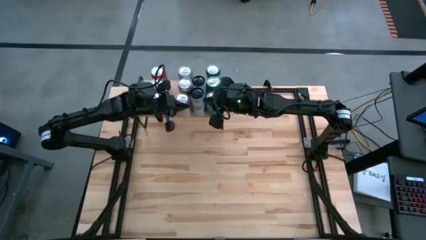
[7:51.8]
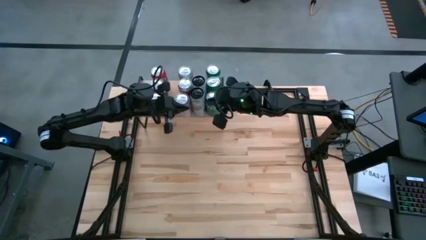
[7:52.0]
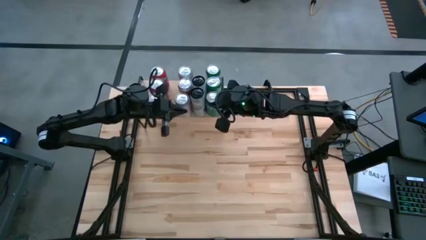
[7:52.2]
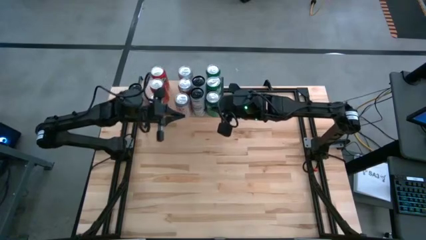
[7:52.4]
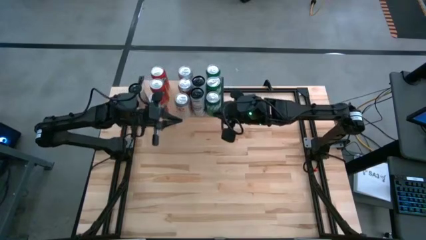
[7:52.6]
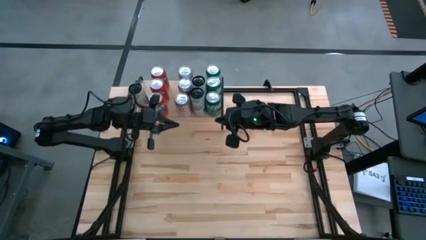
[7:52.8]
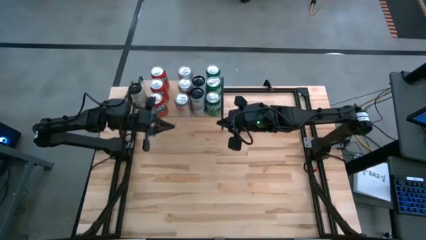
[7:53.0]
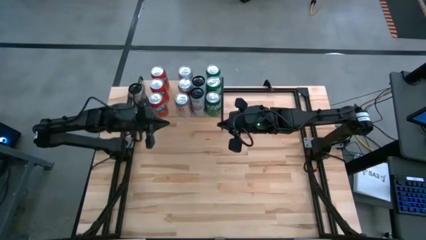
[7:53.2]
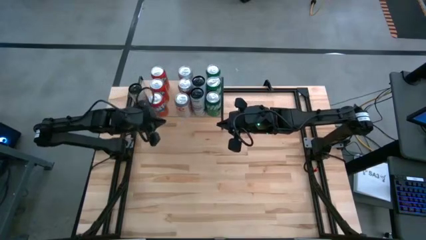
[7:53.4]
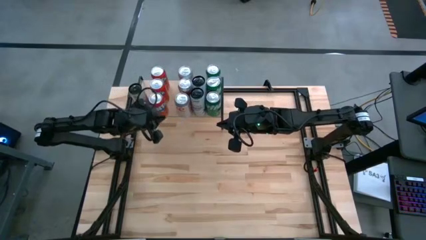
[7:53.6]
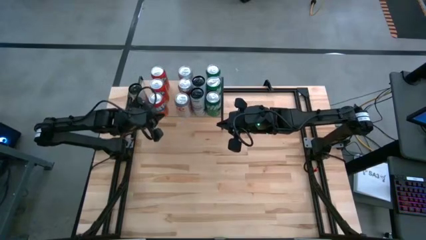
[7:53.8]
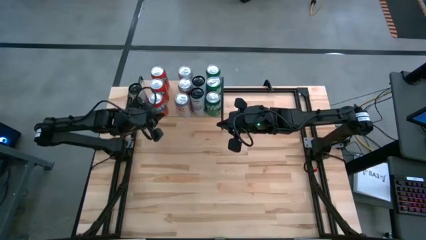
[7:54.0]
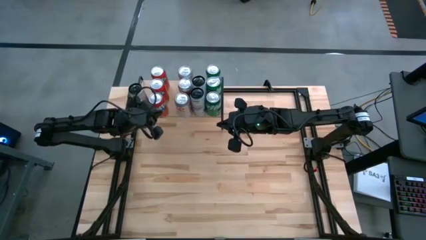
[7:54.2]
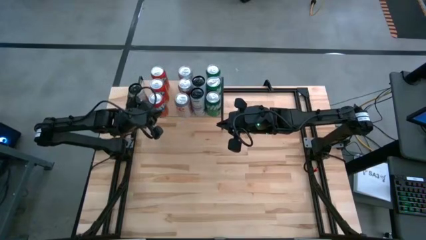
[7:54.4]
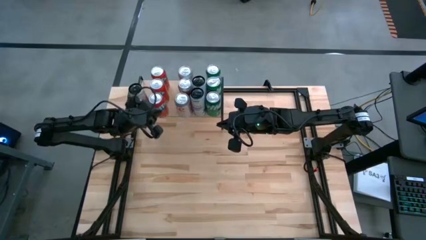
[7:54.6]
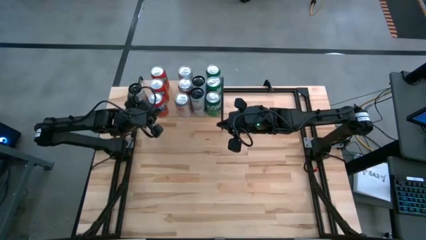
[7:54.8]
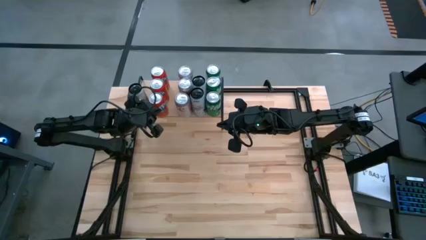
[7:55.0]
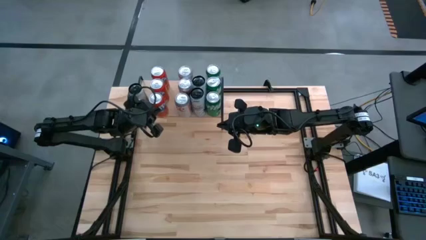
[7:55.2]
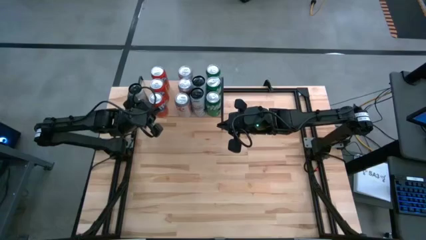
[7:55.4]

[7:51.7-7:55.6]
Task: Place canned beverage on shelf
Adjust the red soda can on the shelf

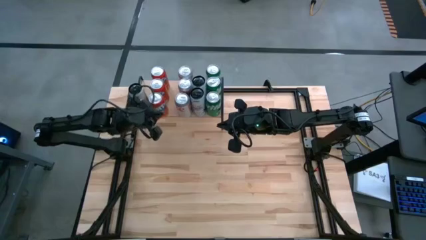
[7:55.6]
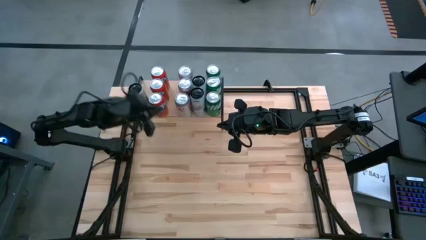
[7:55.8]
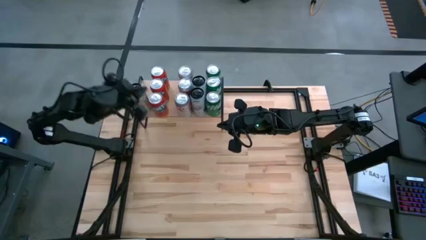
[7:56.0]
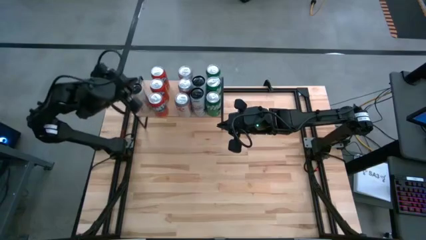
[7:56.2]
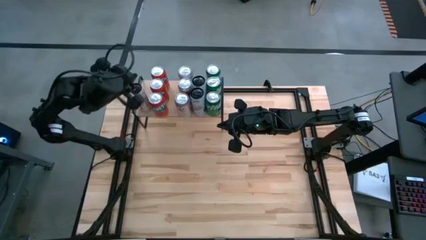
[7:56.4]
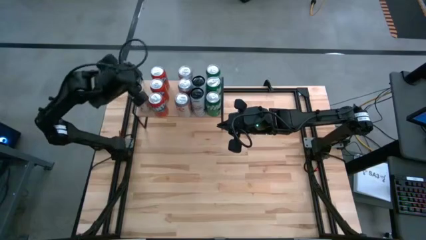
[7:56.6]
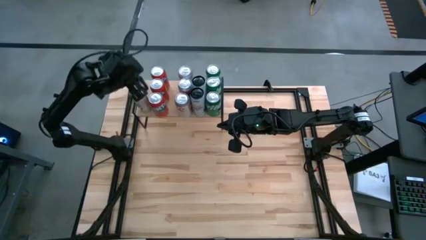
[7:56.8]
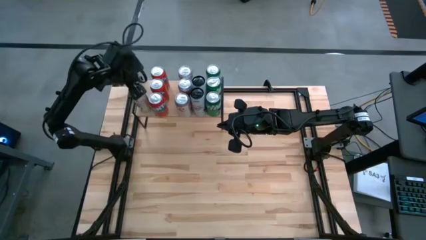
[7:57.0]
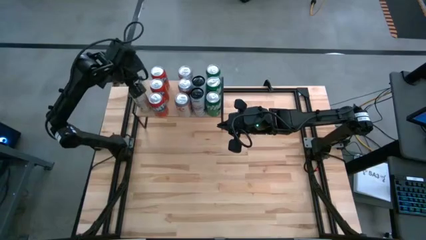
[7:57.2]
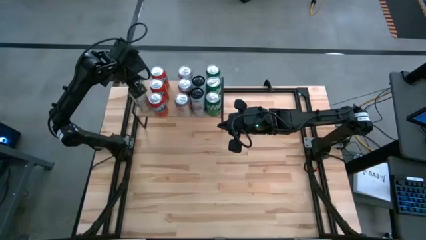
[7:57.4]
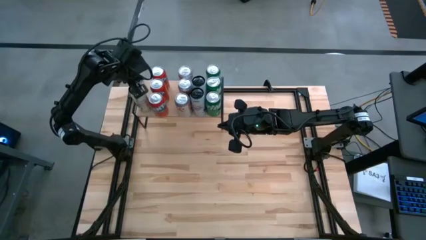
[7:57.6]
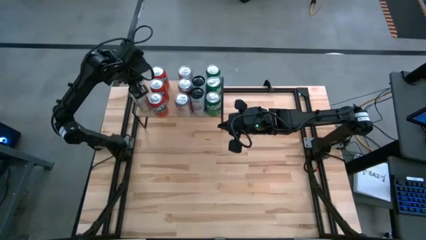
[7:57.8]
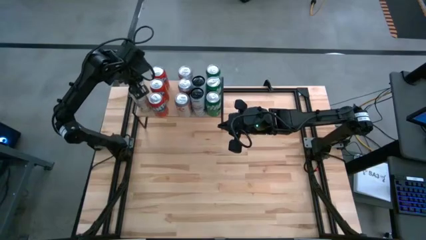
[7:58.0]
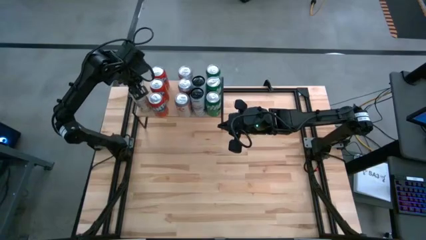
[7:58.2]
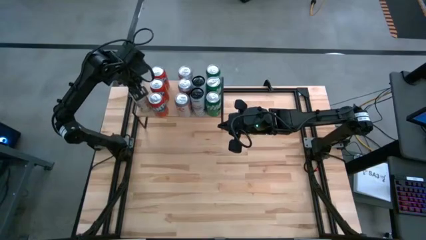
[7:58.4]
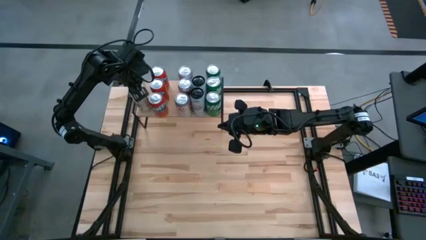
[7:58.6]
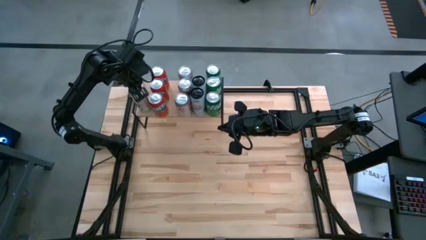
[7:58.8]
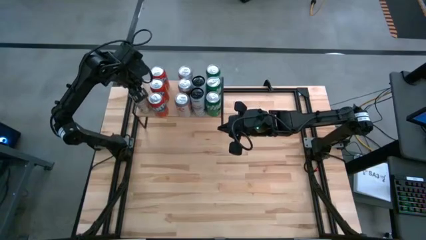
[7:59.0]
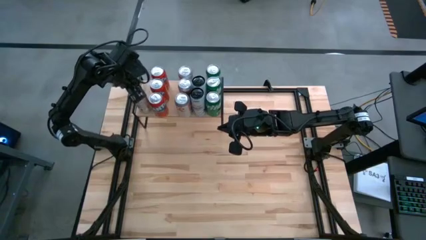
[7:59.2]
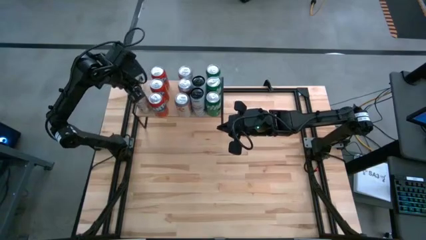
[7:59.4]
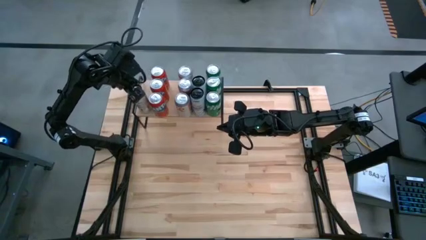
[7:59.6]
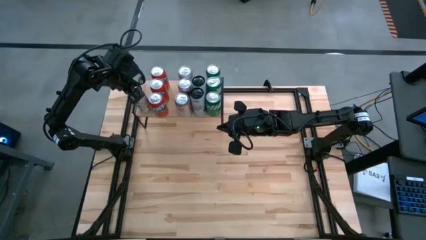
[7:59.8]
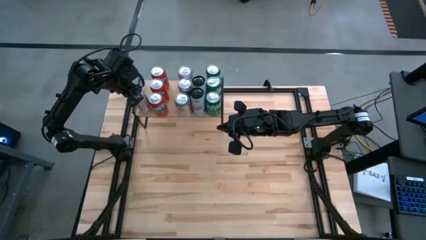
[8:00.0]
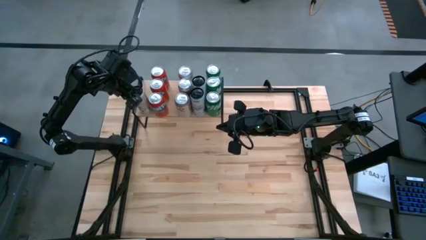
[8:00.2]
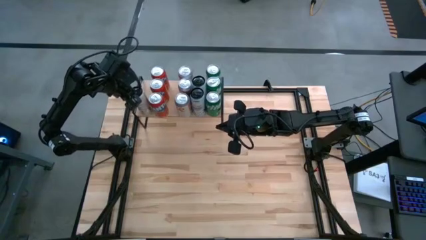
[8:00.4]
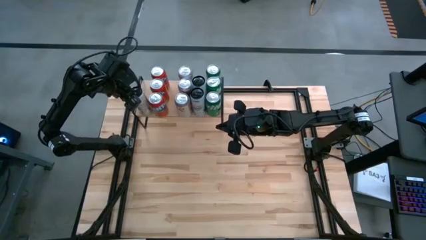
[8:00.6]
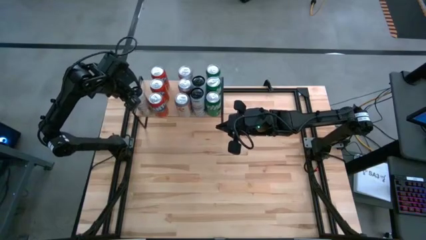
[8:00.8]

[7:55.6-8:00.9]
Adjust the white and yellow soda can on the shelf

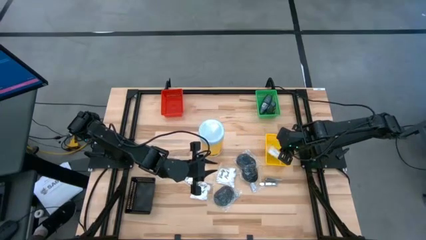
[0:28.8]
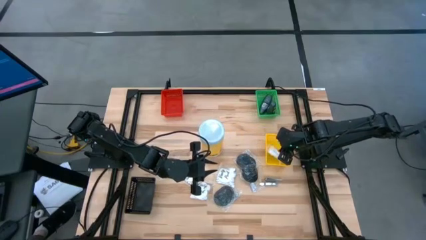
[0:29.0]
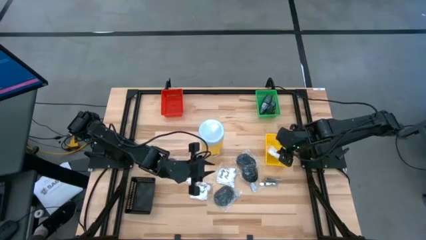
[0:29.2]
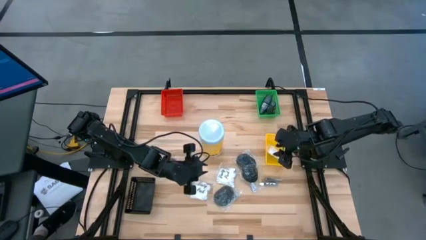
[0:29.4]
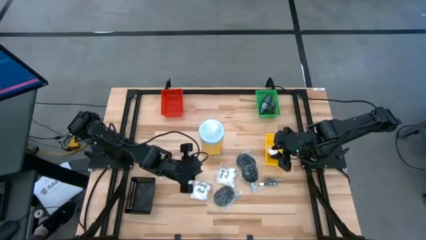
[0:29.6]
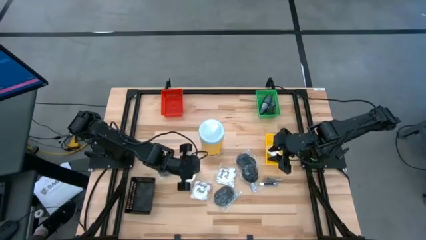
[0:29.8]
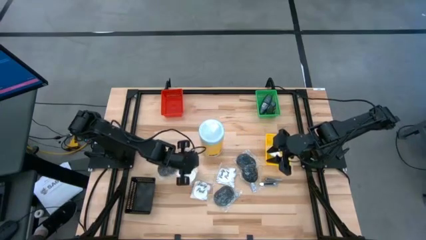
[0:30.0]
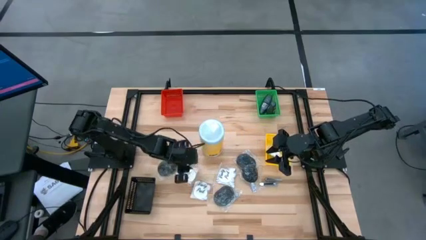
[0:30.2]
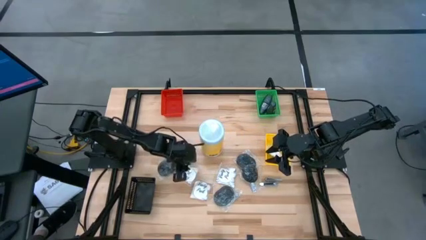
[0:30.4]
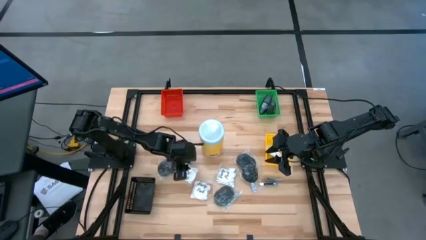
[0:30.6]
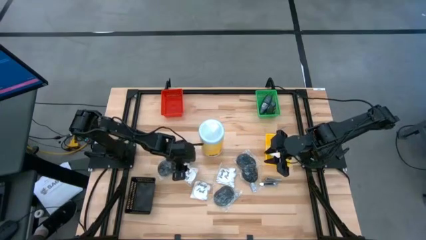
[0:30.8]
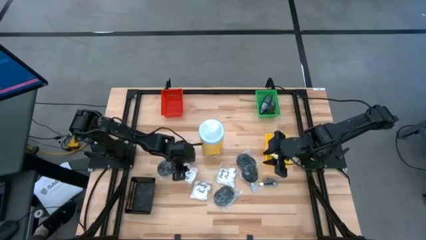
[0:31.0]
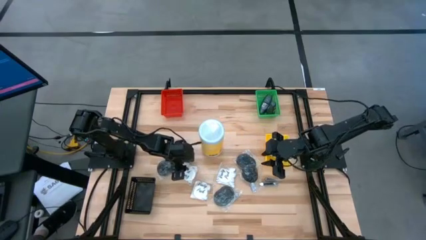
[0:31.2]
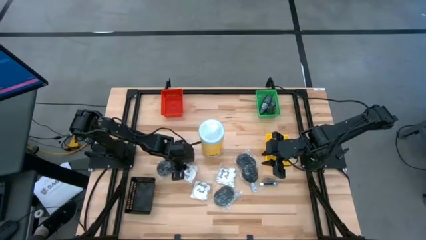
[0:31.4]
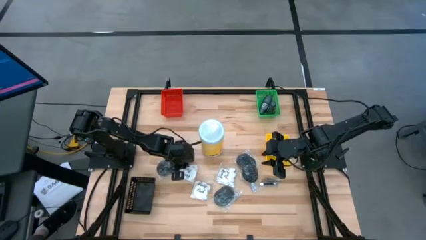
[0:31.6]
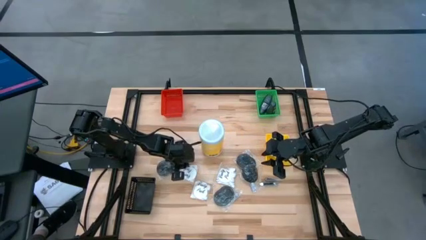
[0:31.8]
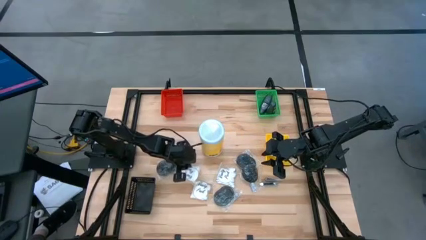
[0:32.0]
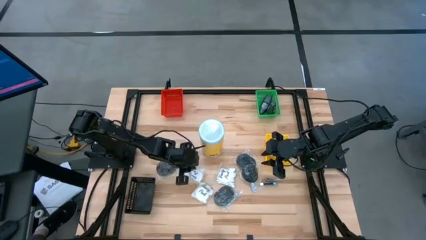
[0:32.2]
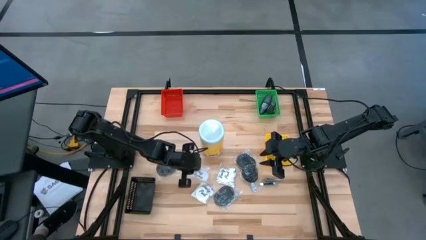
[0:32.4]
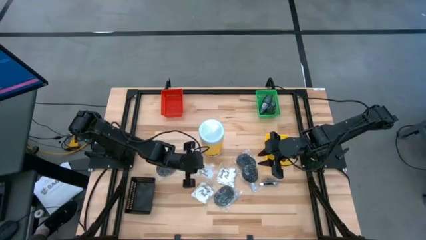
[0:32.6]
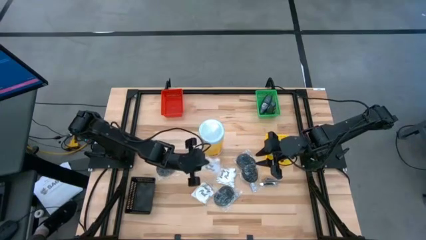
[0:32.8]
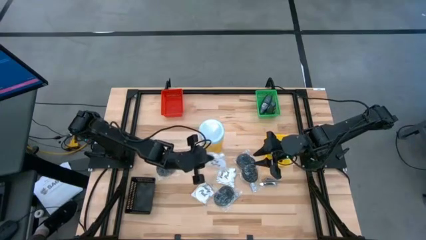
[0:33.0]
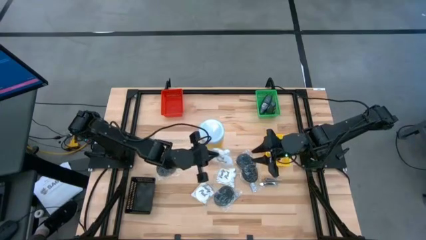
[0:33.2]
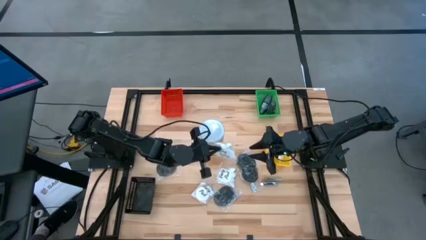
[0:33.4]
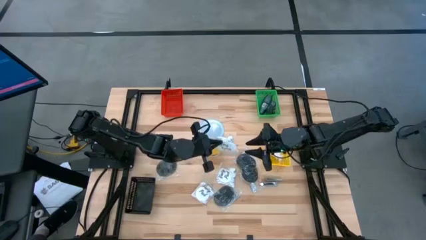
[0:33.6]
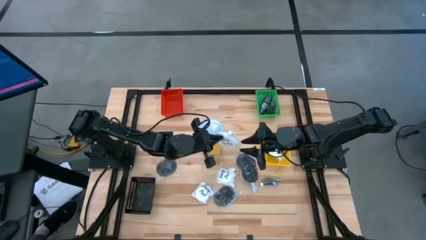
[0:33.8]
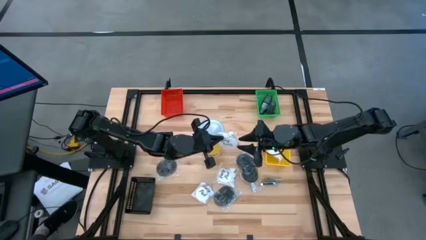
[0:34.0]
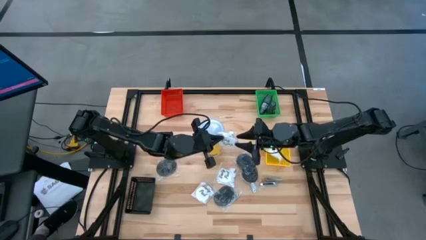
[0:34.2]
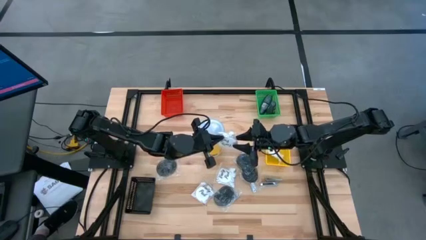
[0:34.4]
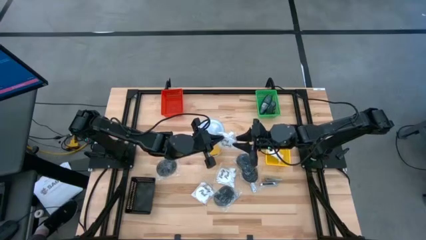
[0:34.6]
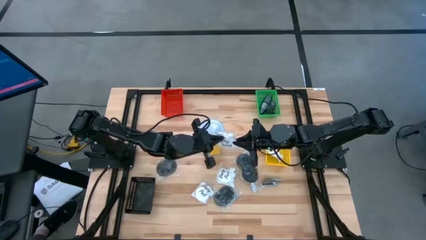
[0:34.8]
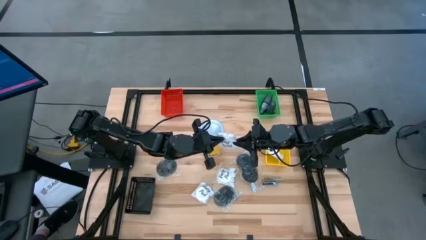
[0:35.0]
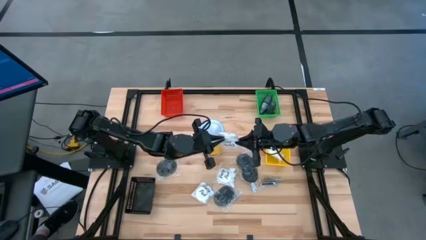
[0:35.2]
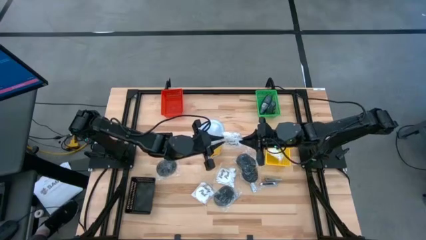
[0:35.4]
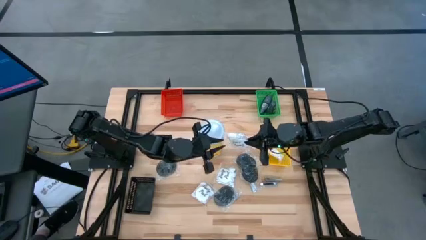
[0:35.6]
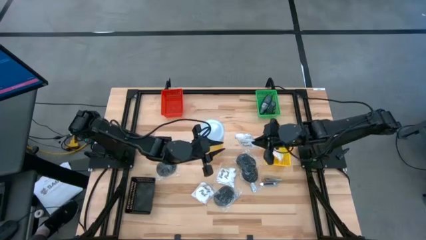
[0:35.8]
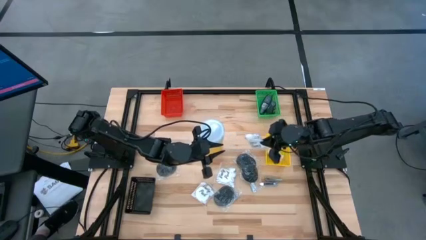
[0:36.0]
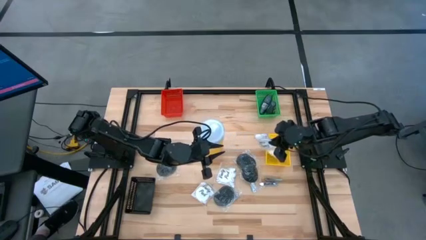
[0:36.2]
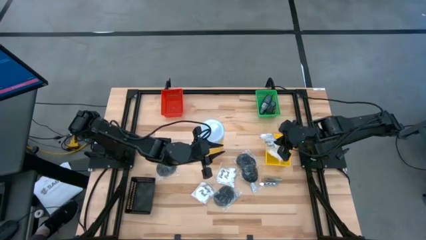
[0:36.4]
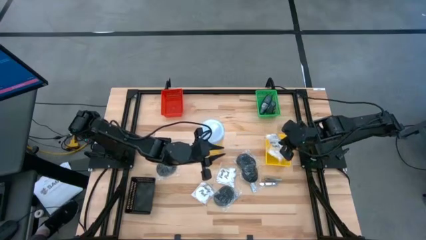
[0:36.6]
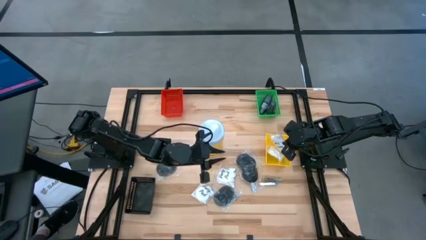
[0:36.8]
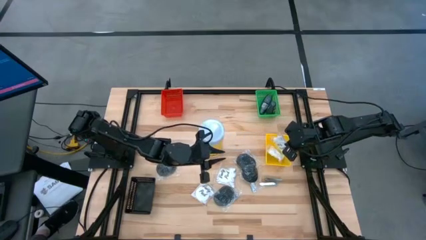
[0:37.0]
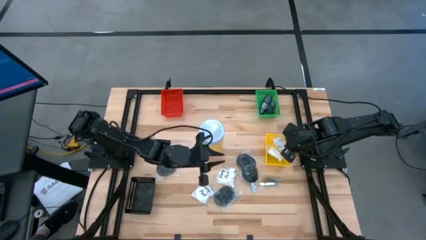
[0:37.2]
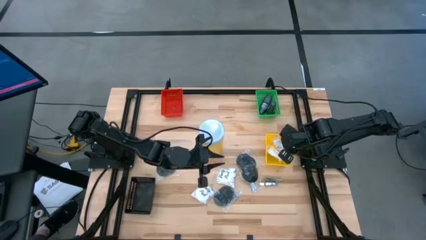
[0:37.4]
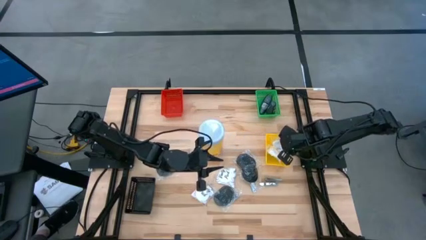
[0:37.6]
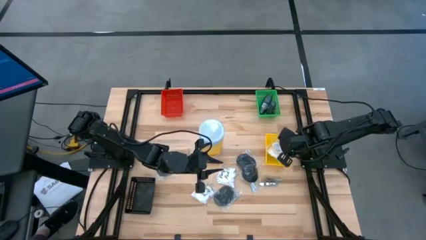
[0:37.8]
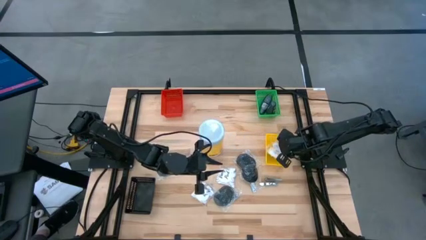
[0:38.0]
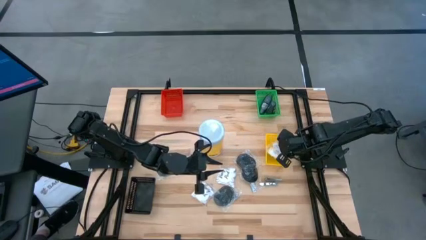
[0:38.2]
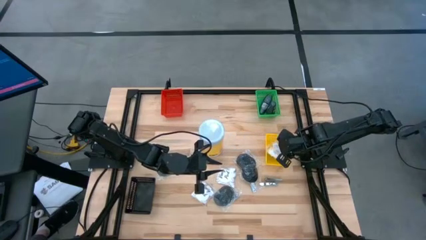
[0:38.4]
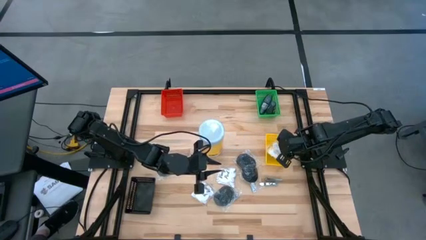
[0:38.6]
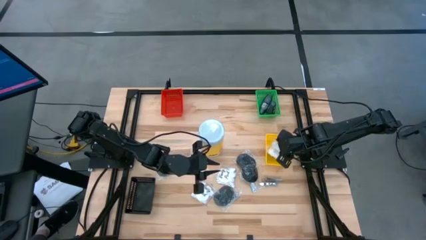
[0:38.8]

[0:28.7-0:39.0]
Task: Pick & Place Travel size toiletries
Put the white cotton pack into the yellow bin
